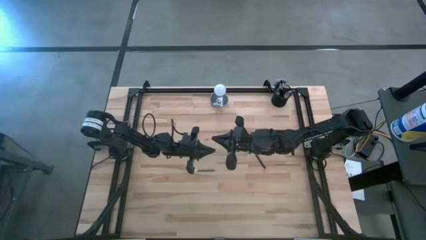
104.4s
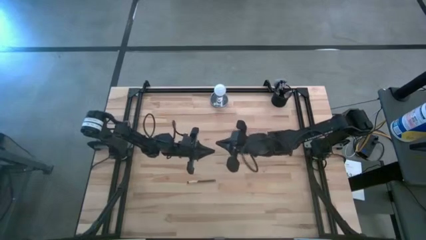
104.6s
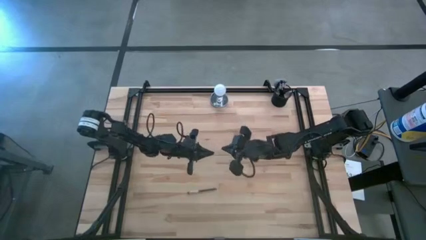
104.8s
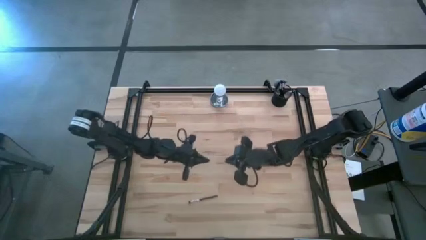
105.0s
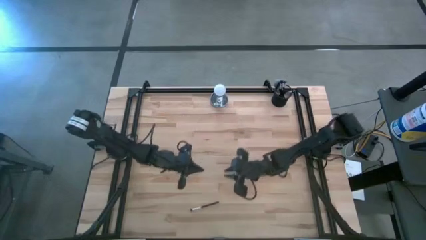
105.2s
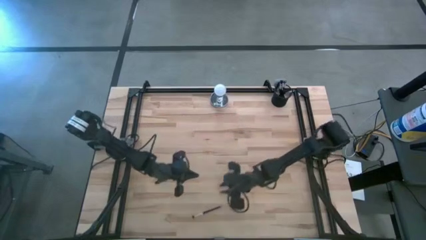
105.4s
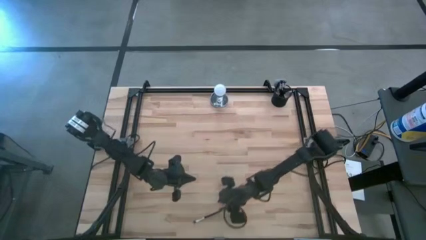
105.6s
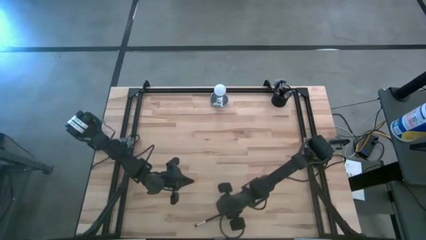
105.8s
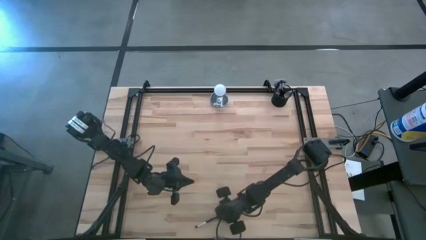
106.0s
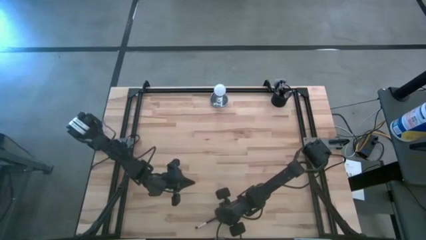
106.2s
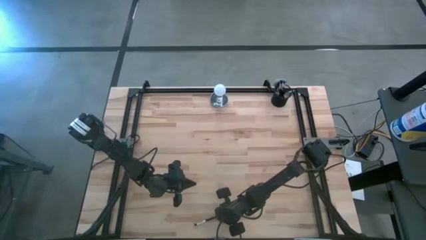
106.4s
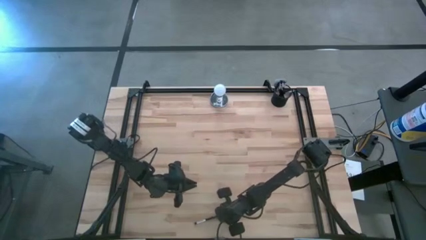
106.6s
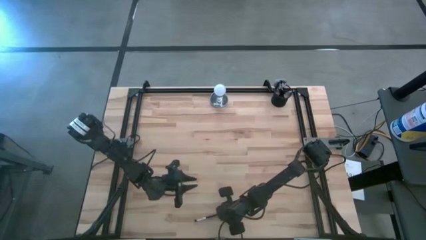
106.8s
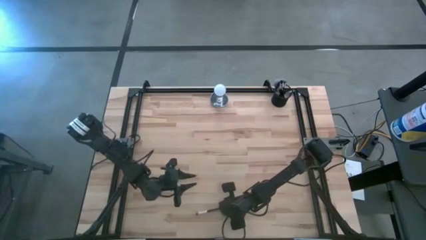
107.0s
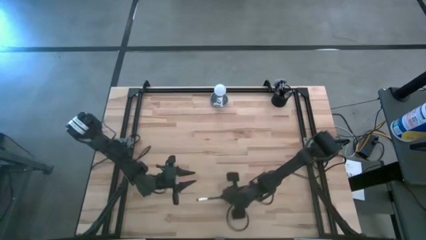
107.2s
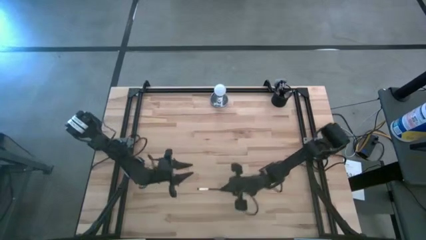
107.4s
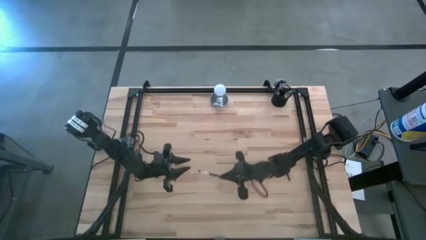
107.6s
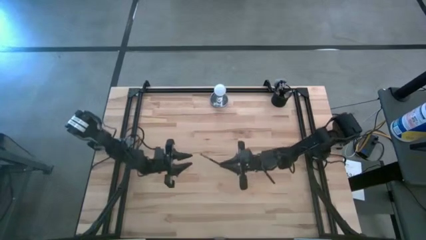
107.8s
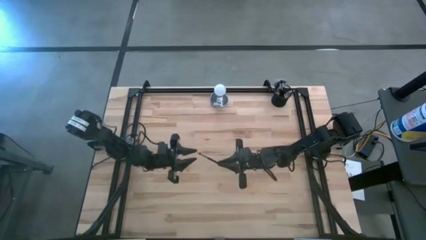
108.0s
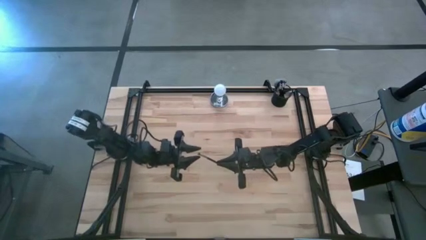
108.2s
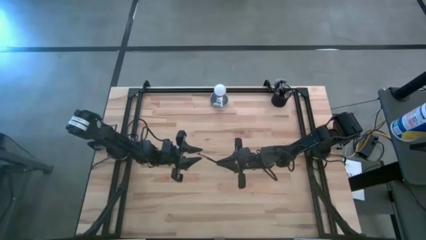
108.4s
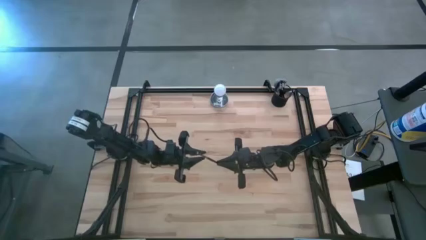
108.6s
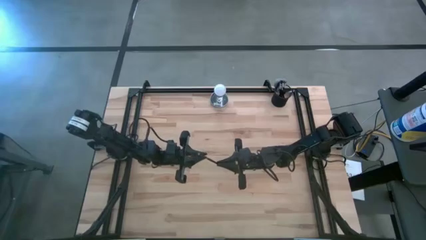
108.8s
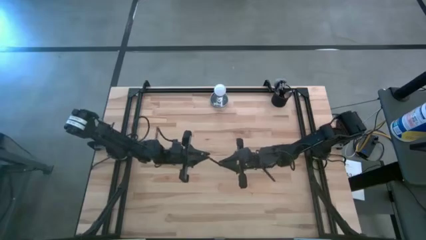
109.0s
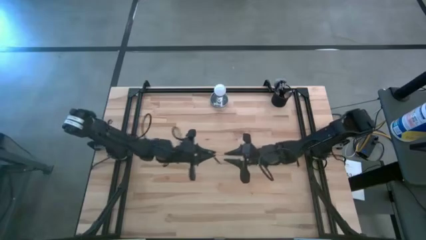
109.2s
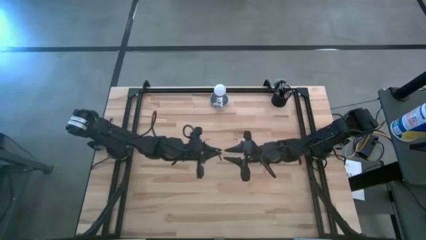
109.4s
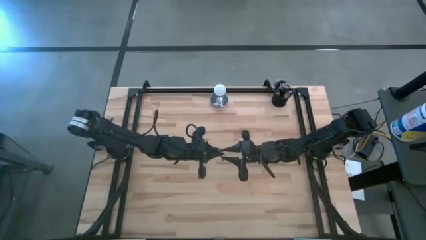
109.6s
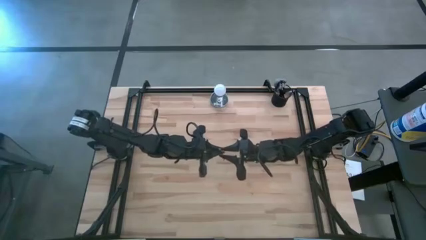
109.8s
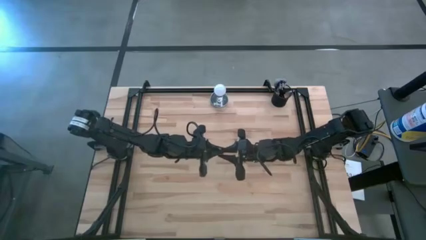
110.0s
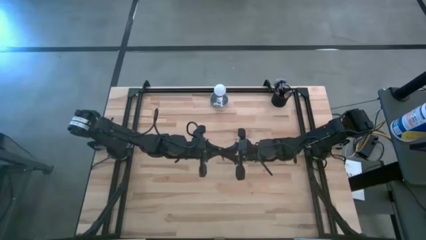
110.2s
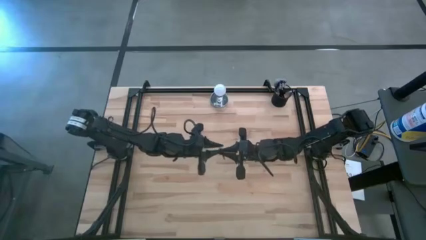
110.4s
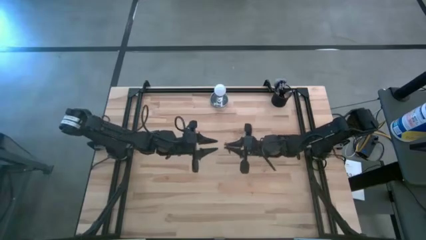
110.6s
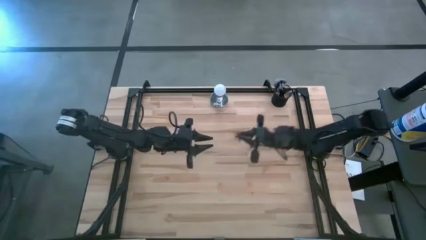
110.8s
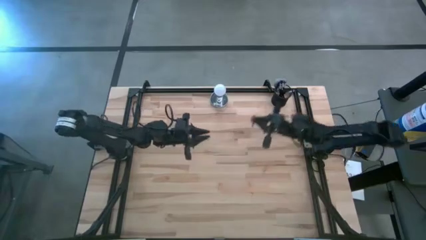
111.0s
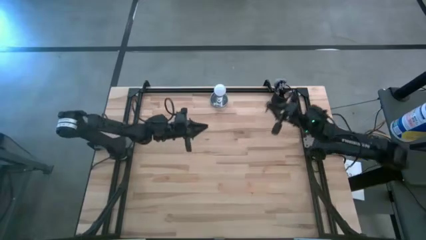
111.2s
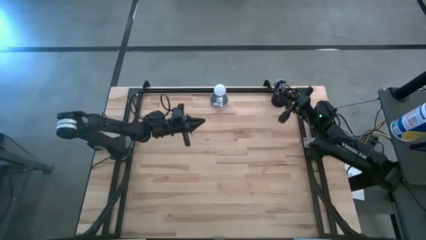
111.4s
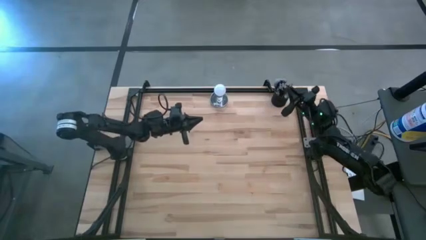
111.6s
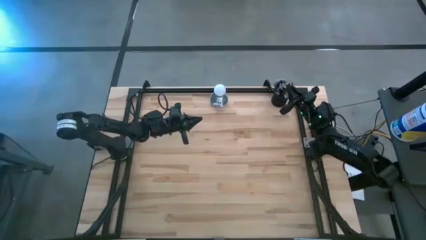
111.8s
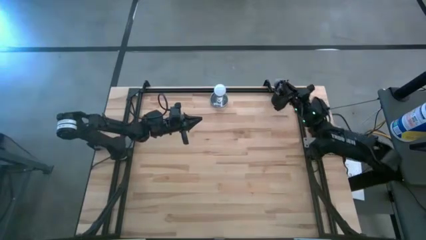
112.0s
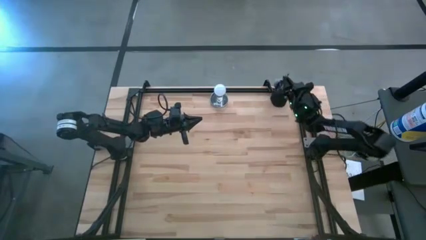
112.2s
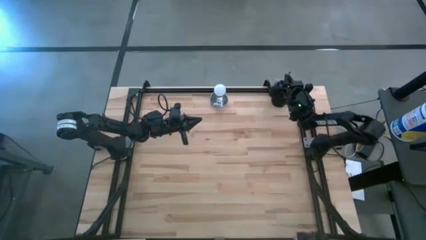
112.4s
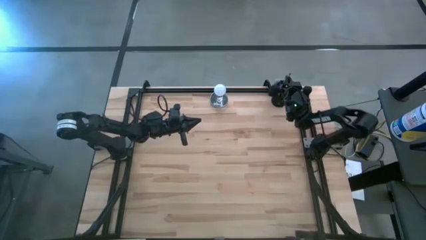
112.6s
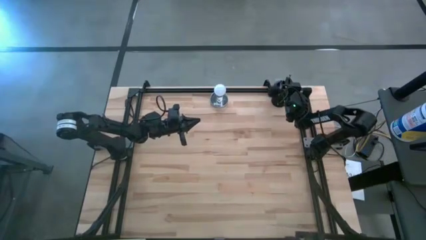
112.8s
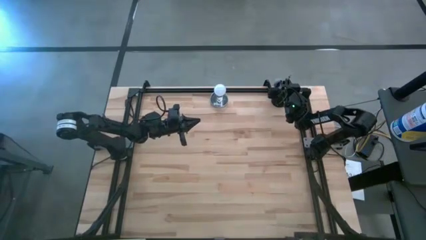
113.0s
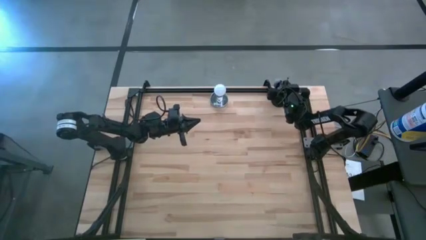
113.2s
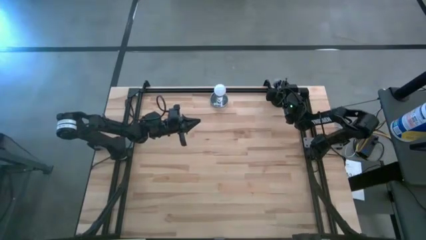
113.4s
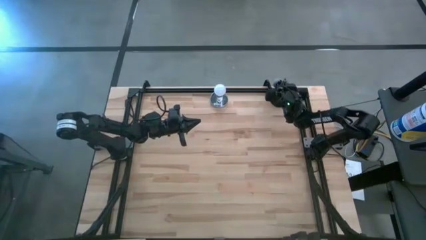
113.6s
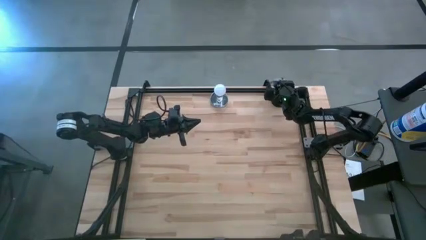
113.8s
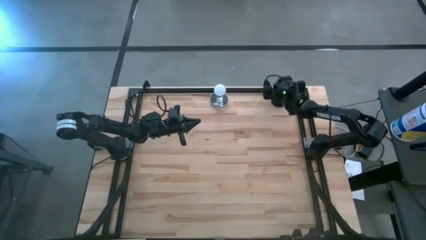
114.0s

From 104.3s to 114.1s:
Task: Pick & Place Makeup Supplies
Put the makeup brush into the makeup holder

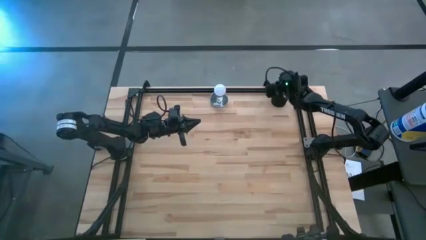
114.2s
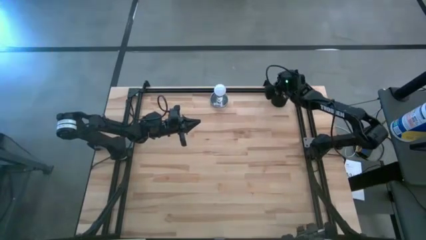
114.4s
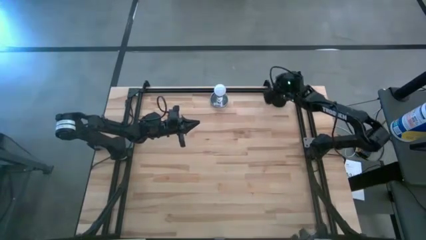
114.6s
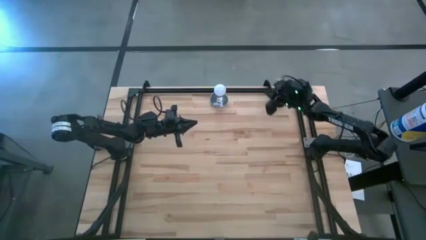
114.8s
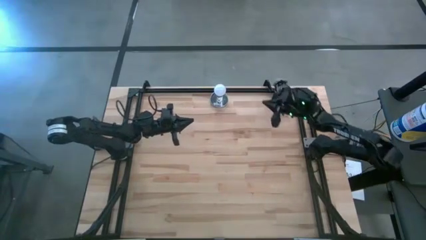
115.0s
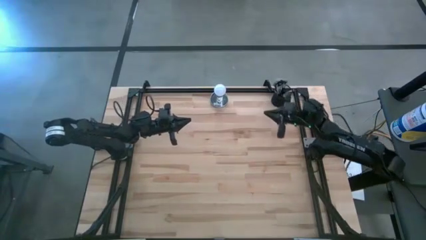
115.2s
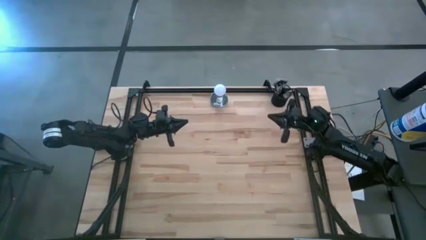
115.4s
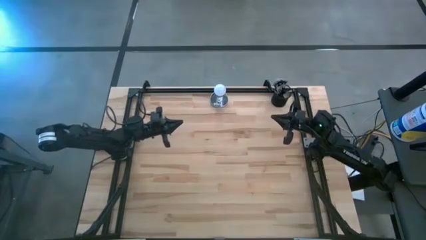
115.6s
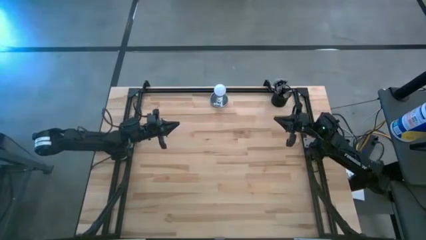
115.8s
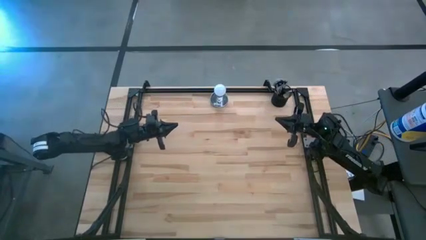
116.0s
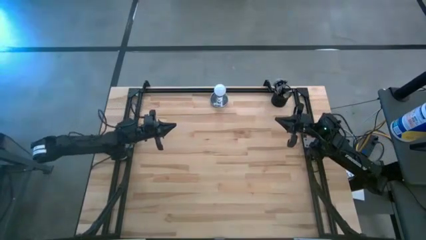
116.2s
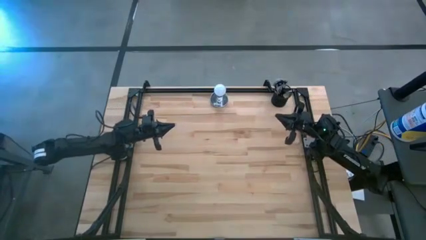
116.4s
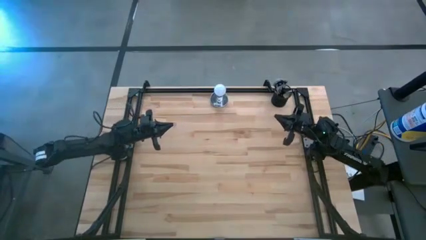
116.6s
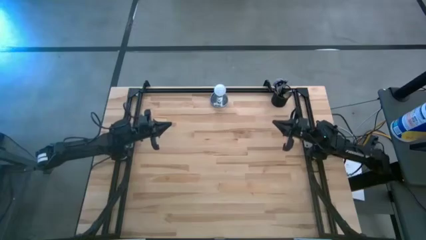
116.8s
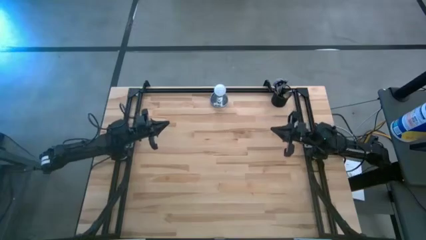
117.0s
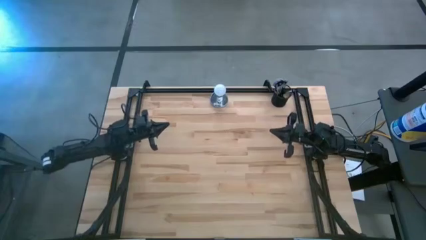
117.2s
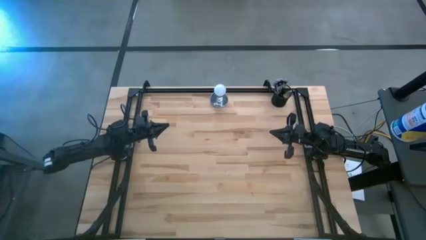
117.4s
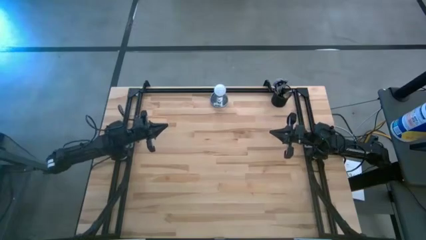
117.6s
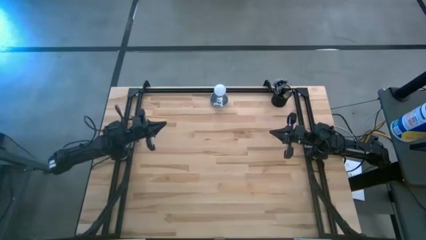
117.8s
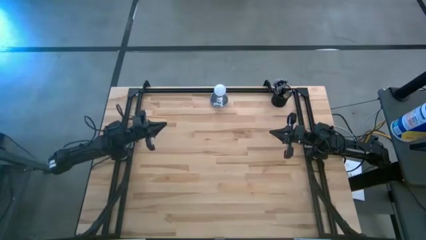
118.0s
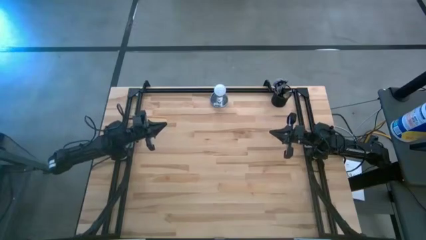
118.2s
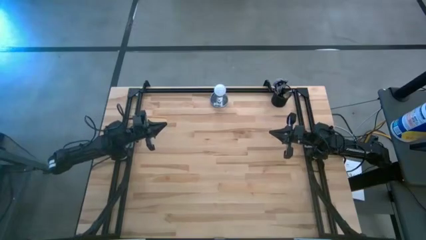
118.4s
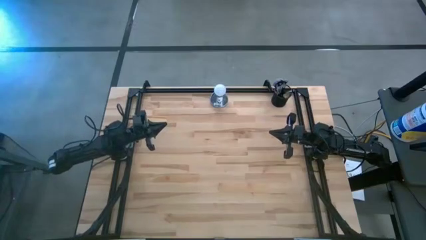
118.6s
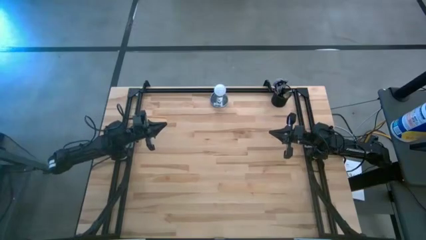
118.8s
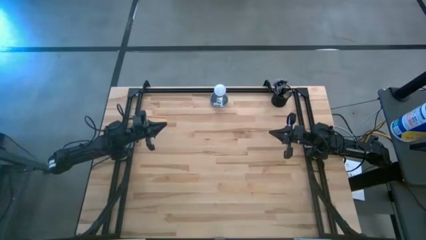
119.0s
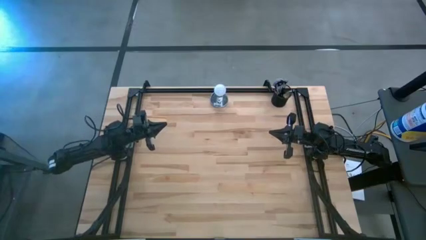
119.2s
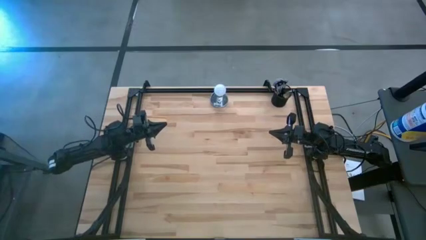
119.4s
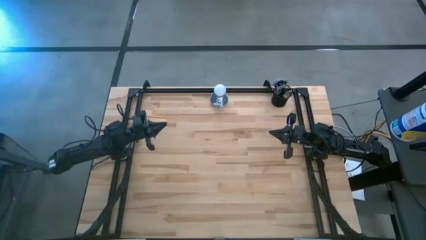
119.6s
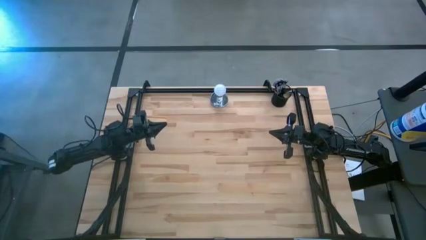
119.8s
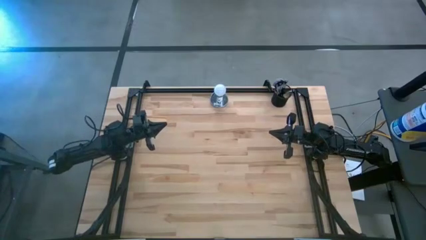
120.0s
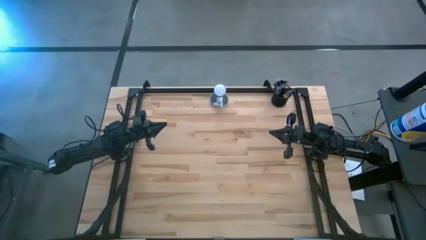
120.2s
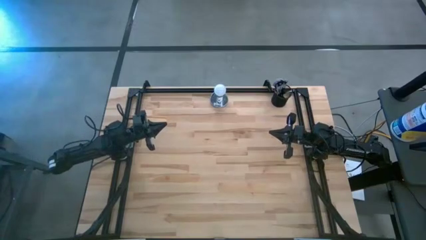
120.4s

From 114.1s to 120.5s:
Return to Home Position
